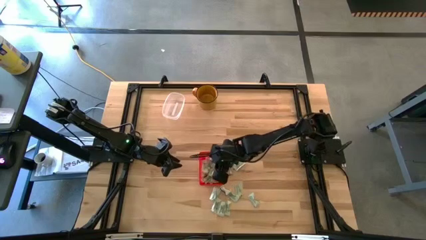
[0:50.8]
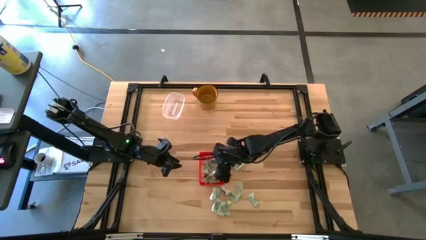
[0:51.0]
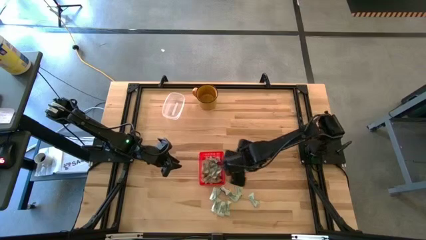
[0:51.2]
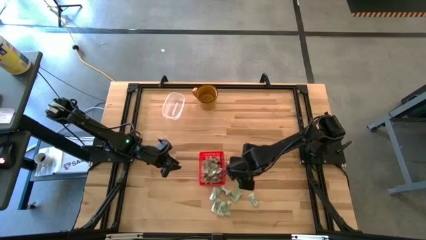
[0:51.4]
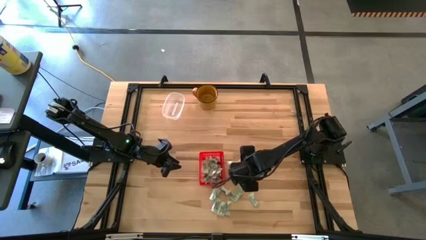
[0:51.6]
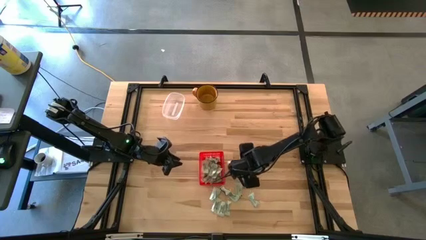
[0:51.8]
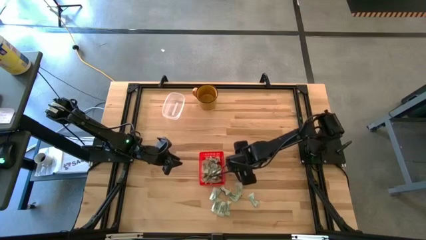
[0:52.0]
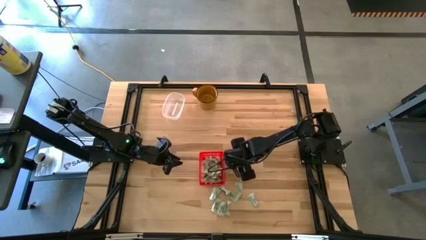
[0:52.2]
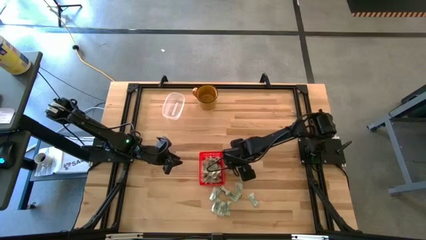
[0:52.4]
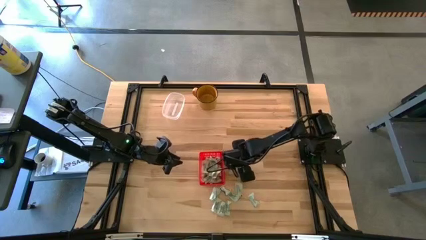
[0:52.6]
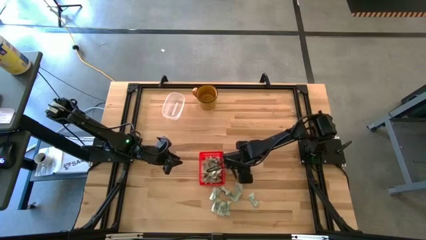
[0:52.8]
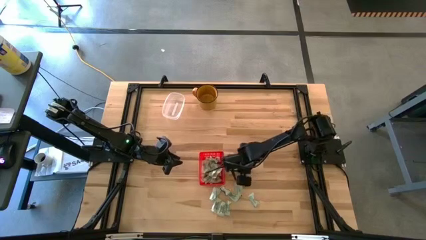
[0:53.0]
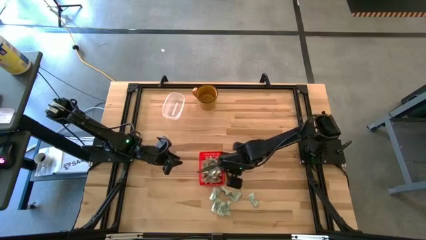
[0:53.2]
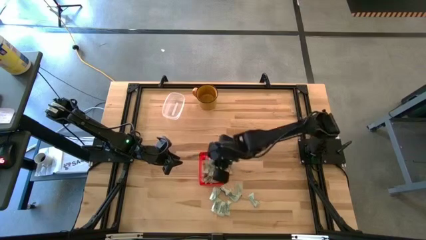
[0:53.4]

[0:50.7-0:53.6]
Task: Pick and place Stevia / Truvia into bins
Put the white stevia packet into the red basket

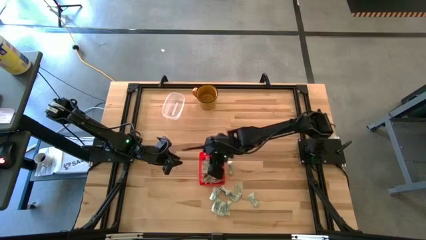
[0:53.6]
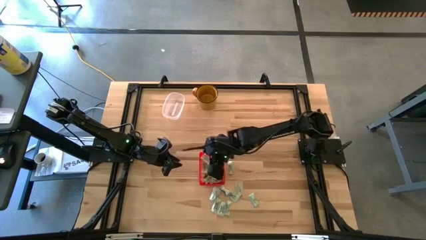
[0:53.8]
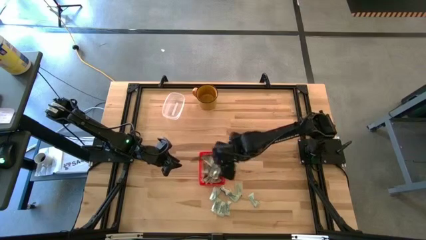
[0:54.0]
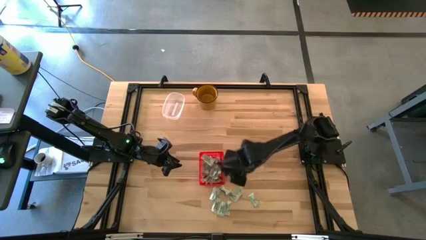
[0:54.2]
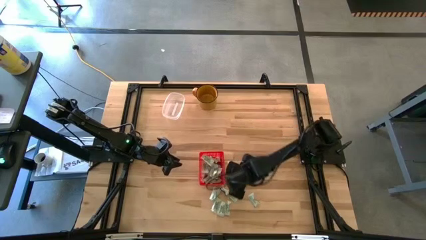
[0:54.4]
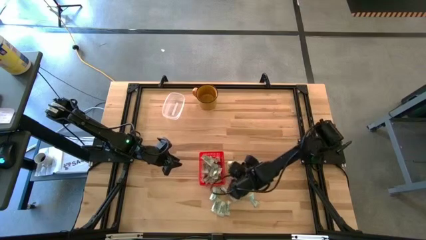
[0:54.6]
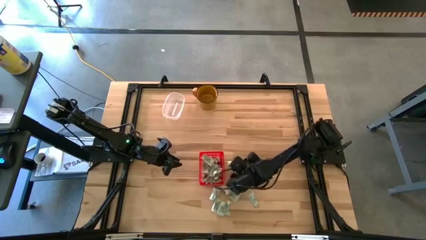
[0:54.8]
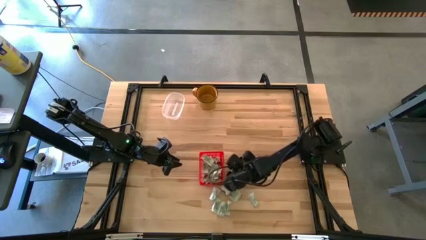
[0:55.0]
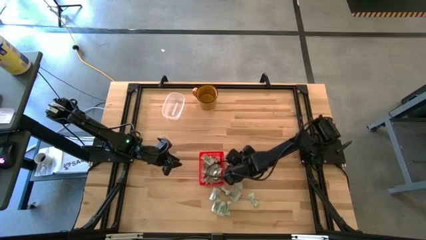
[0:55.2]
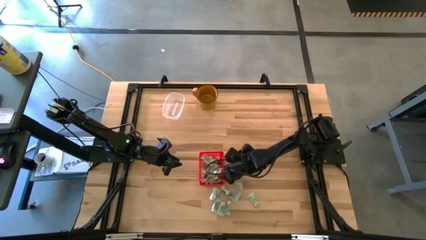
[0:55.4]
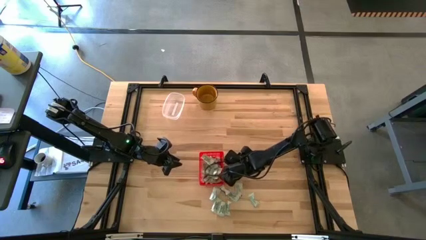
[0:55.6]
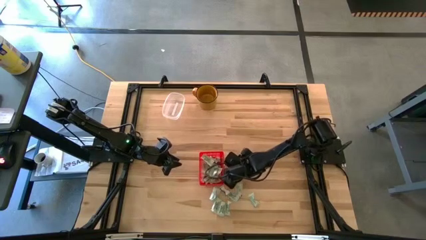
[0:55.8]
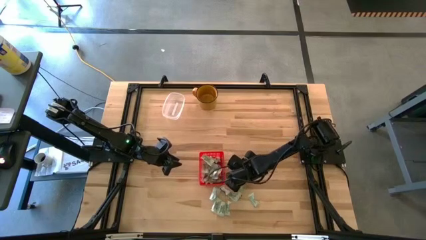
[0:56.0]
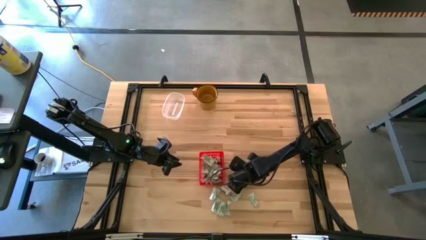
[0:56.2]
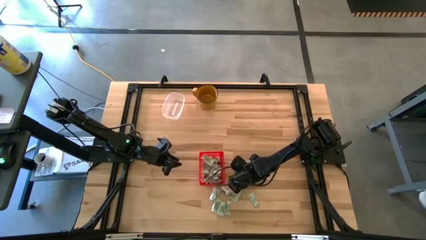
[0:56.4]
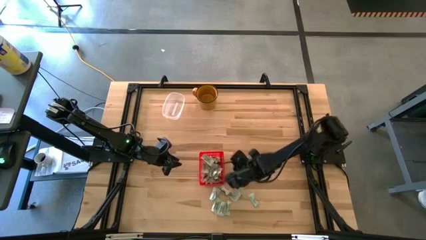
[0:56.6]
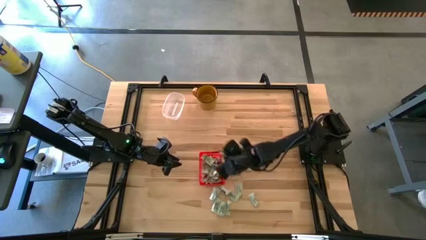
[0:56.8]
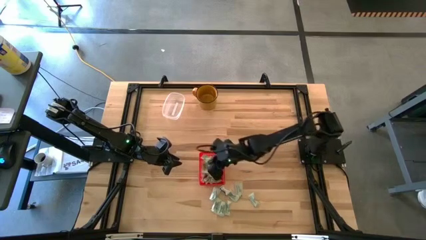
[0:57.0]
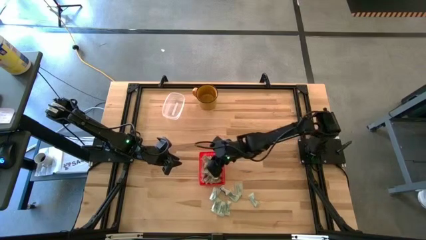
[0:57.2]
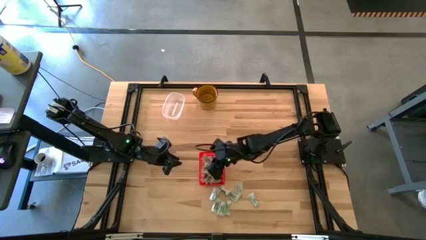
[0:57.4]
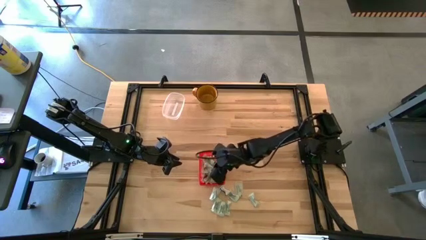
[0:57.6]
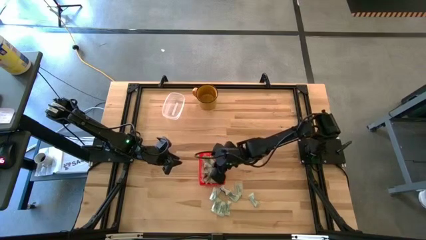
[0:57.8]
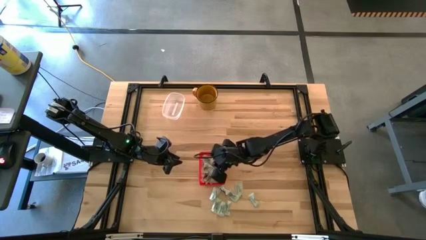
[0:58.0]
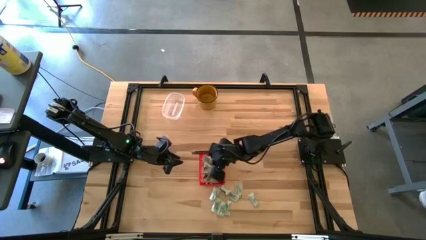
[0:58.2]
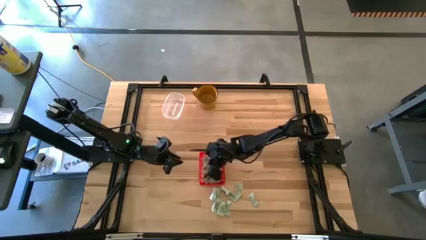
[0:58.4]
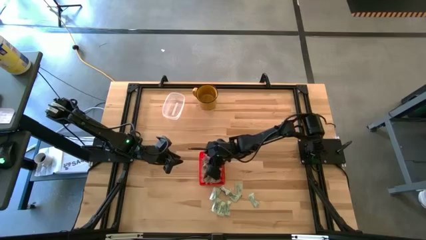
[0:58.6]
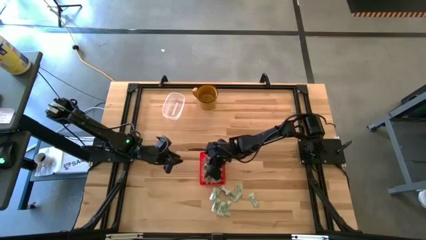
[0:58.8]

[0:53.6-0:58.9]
Put the white stevia packet into the red basket

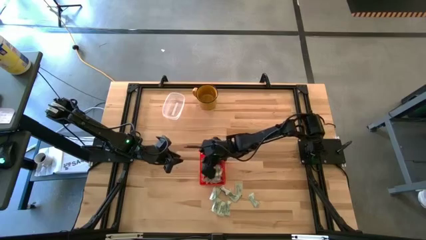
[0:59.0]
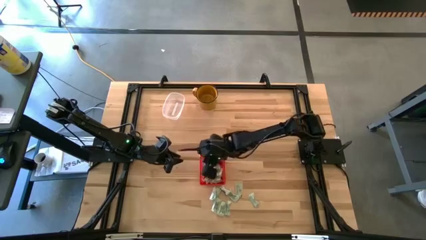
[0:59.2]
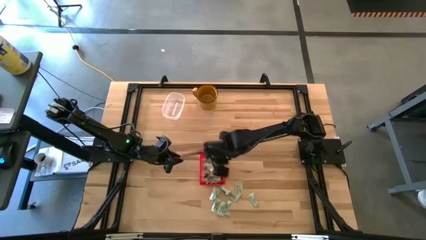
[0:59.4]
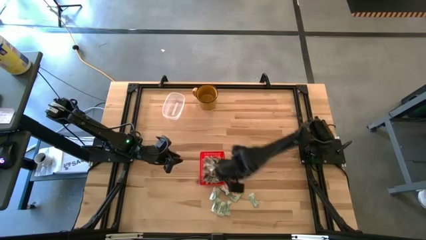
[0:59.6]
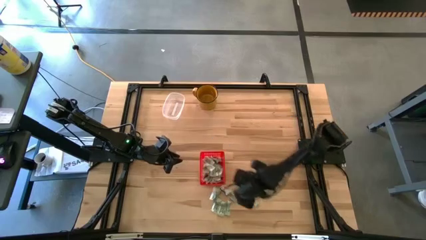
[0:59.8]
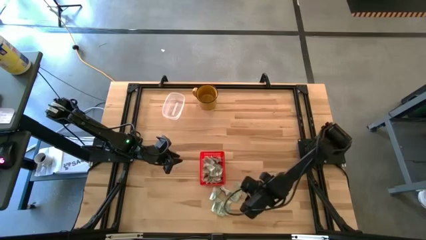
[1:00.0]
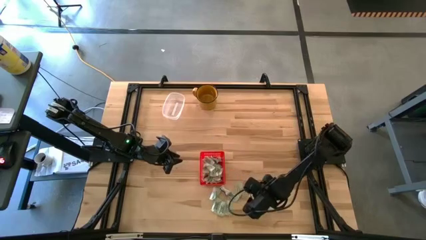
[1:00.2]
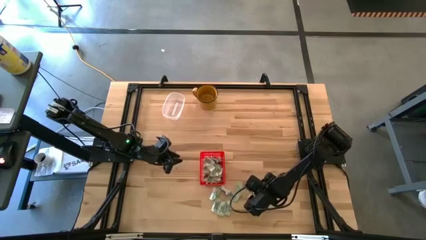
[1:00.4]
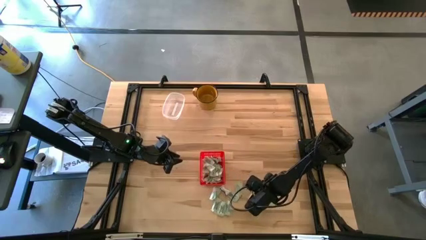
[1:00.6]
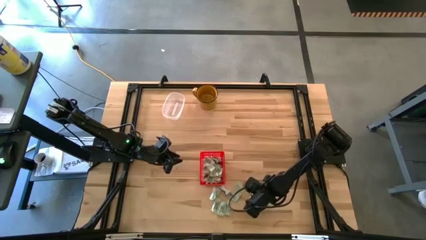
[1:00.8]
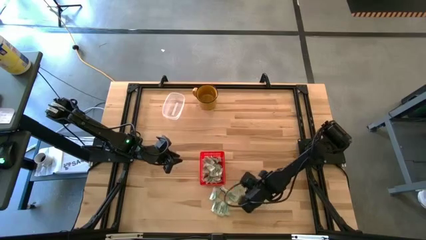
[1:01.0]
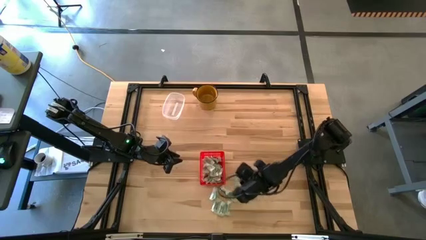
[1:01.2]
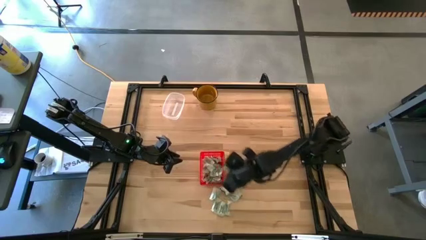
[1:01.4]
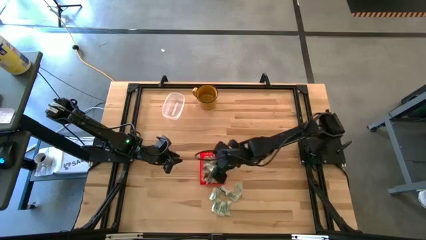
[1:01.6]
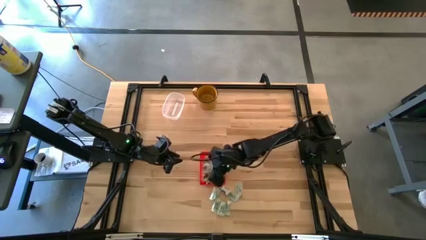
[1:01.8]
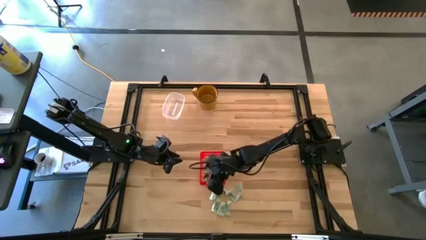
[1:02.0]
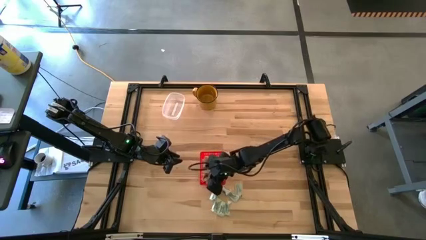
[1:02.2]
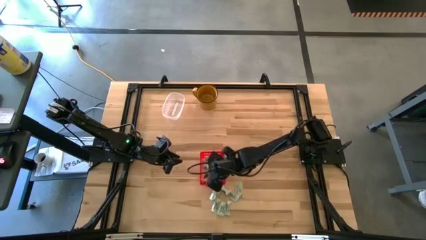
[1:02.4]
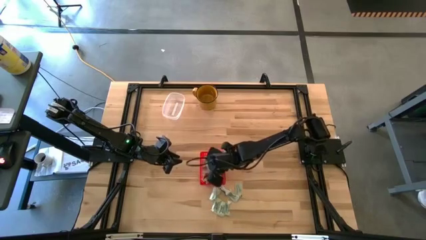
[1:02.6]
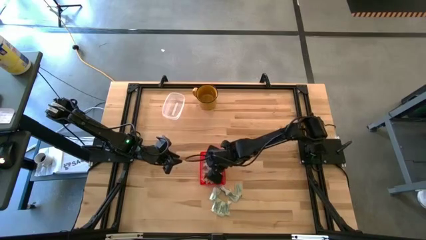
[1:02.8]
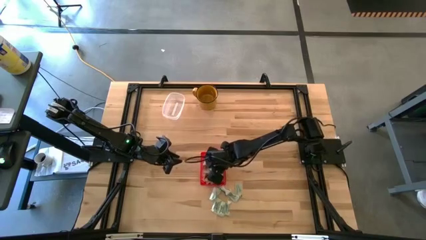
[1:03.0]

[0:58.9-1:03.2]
Put the white stevia packet into the red basket

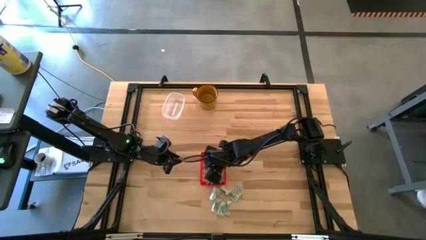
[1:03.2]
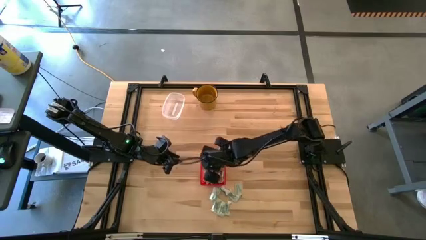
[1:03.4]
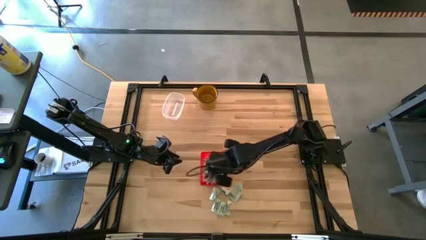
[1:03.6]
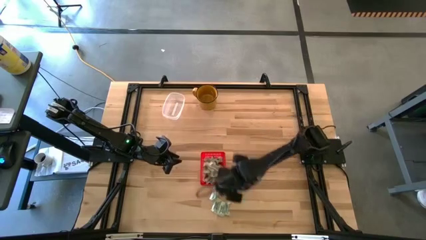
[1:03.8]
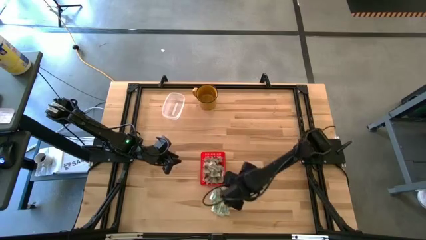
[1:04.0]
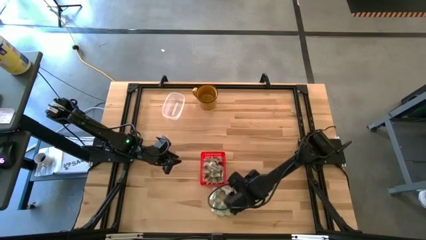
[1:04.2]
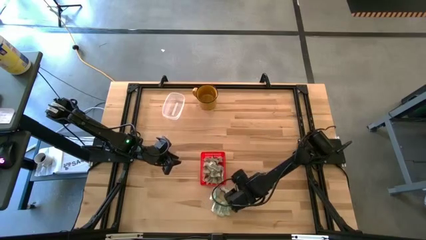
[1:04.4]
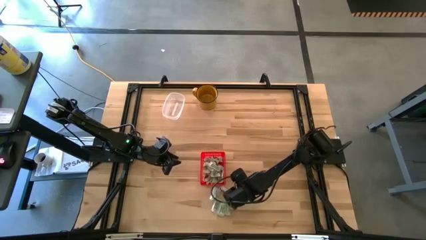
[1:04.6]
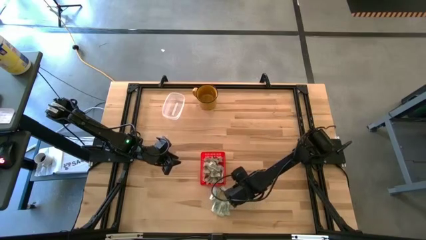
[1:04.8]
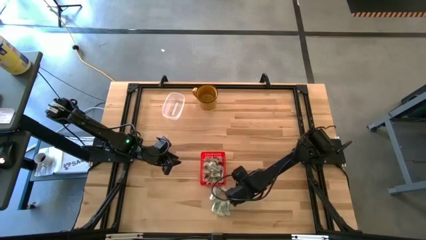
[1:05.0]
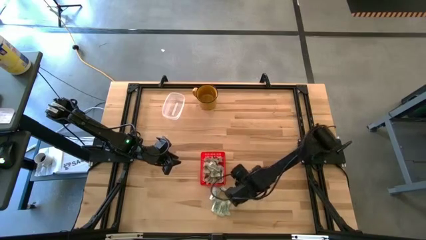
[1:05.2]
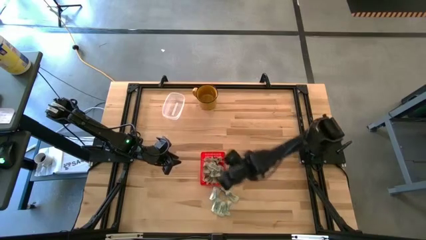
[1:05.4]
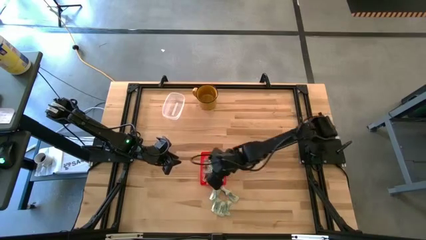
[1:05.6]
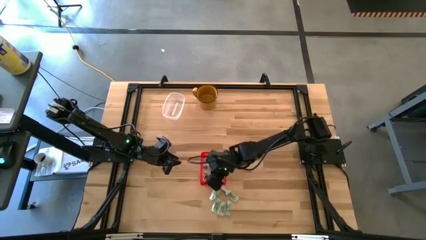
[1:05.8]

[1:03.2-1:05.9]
Put the white stevia packet into the red basket

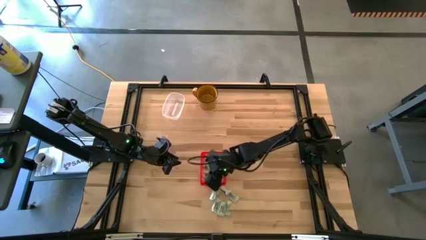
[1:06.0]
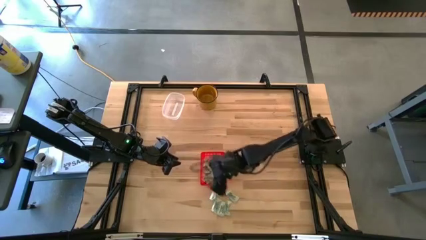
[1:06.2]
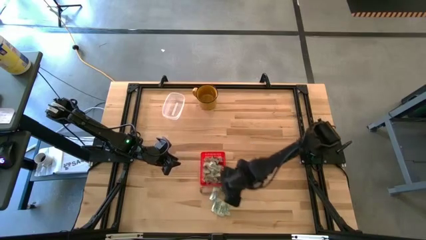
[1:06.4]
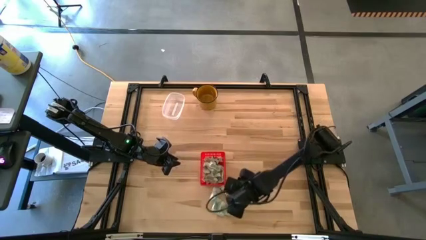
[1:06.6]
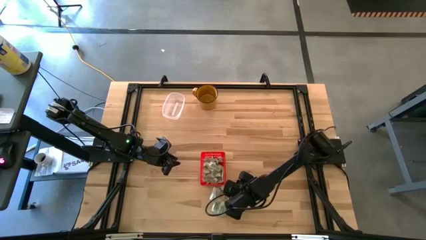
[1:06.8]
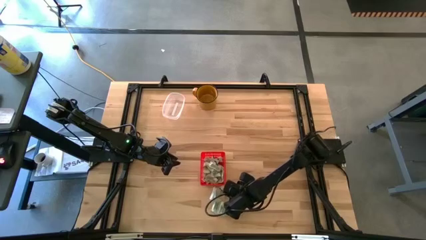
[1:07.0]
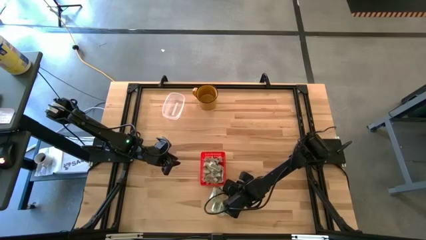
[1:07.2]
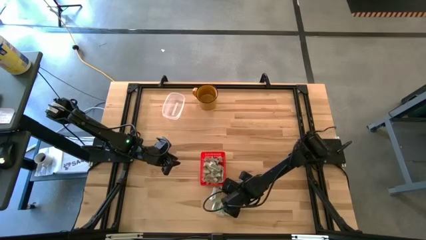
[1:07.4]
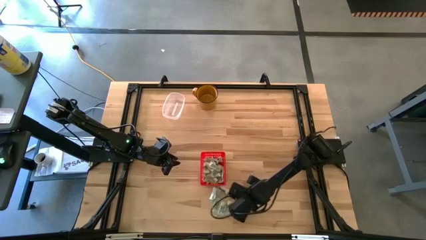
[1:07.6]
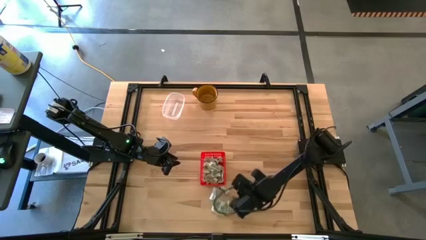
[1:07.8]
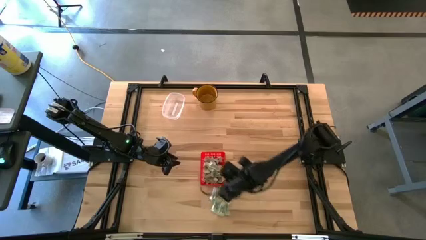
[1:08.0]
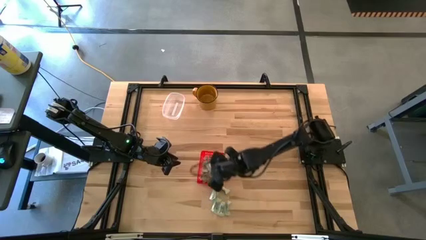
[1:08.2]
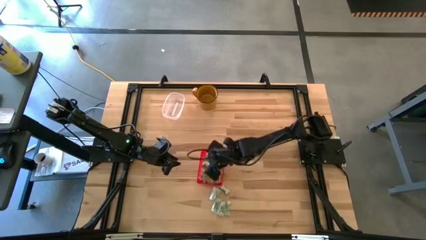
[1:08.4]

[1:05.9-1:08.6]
Put the white stevia packet into the red basket
